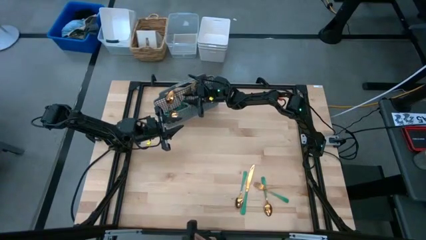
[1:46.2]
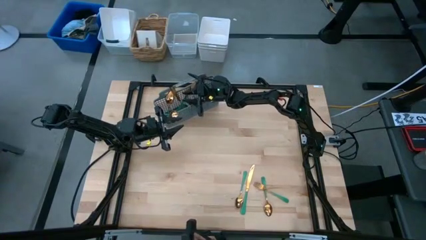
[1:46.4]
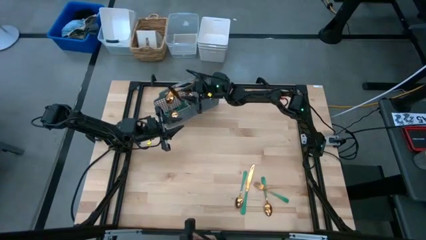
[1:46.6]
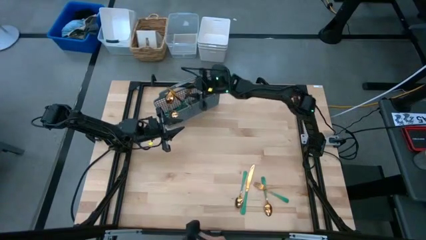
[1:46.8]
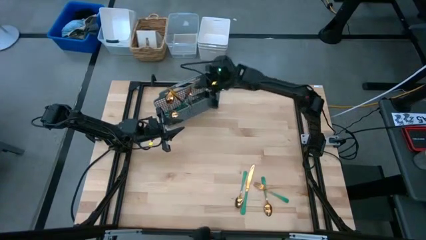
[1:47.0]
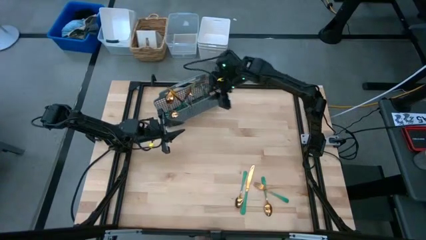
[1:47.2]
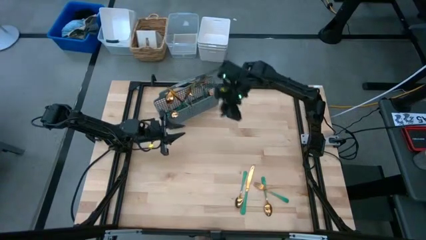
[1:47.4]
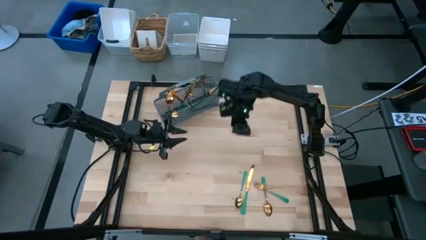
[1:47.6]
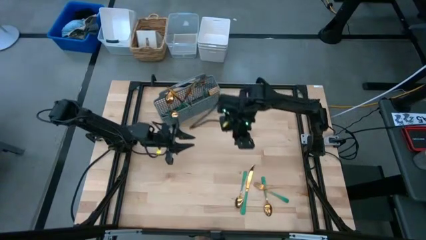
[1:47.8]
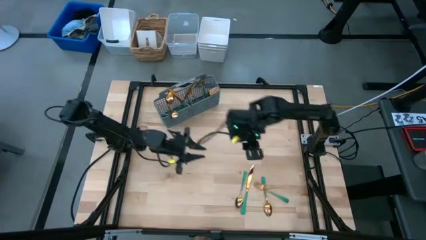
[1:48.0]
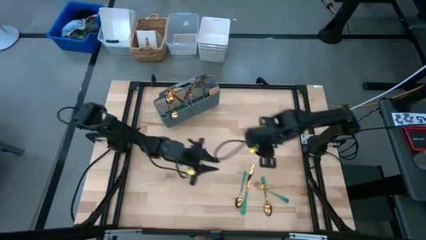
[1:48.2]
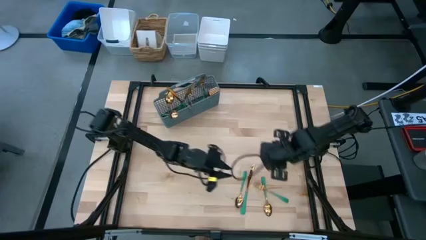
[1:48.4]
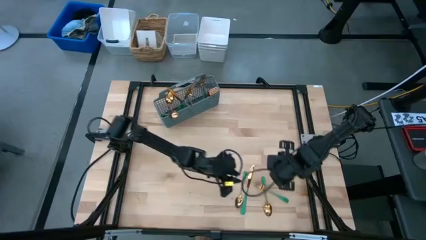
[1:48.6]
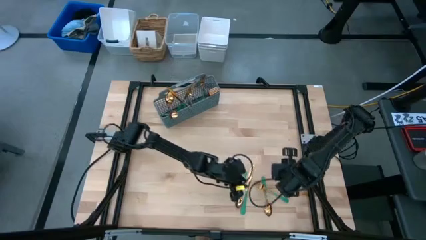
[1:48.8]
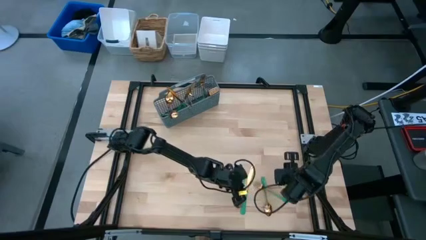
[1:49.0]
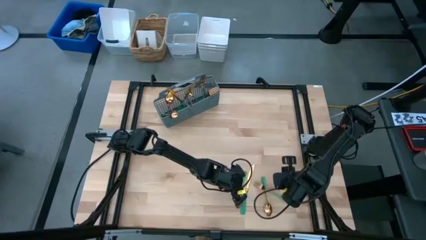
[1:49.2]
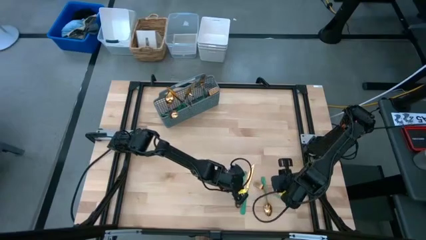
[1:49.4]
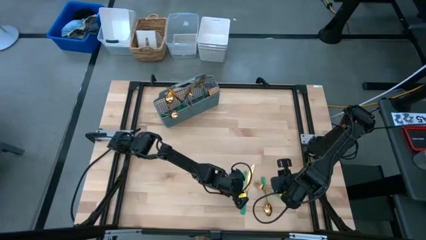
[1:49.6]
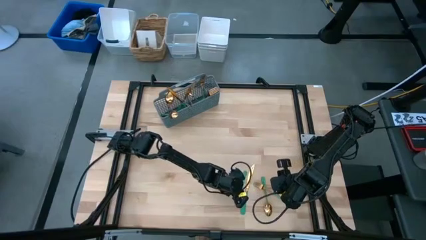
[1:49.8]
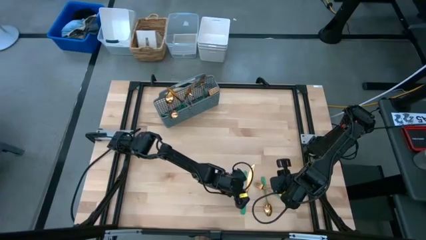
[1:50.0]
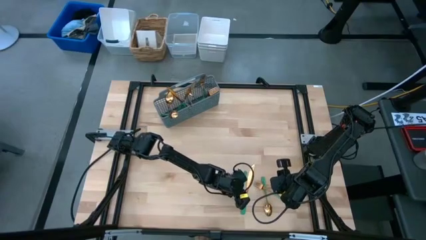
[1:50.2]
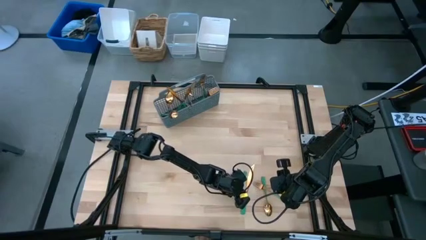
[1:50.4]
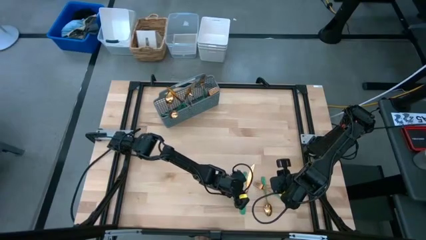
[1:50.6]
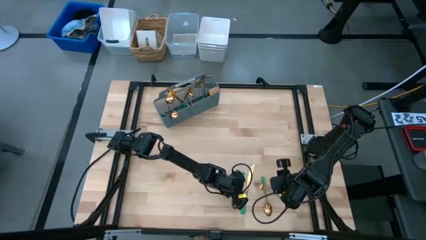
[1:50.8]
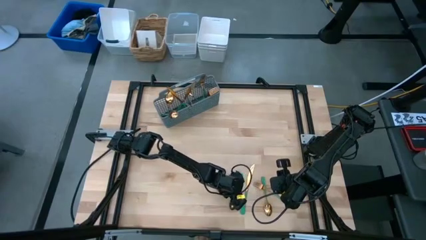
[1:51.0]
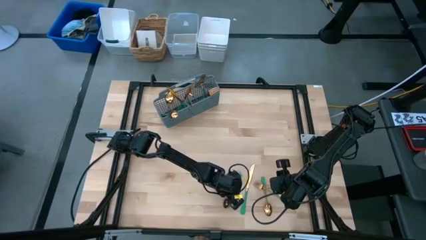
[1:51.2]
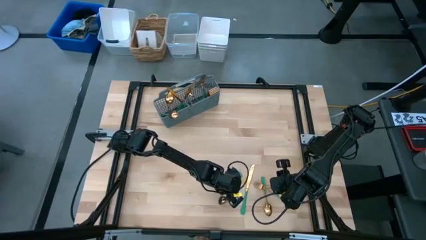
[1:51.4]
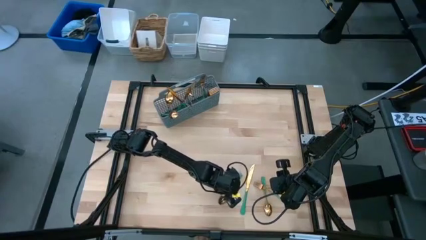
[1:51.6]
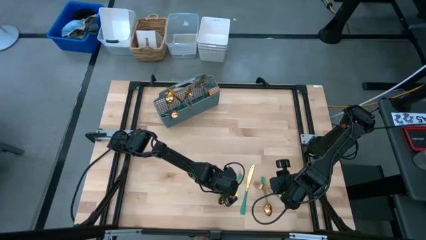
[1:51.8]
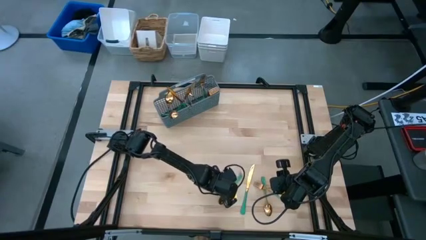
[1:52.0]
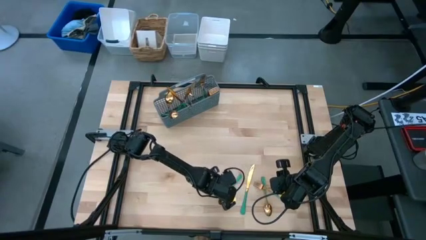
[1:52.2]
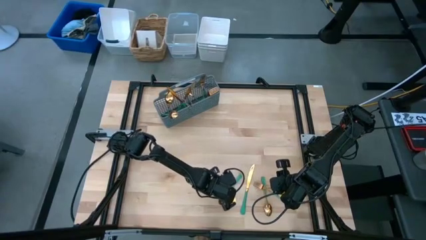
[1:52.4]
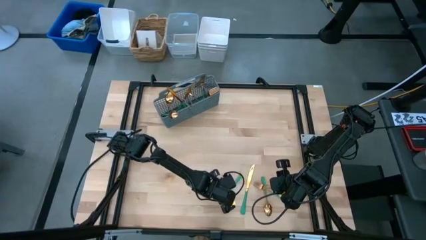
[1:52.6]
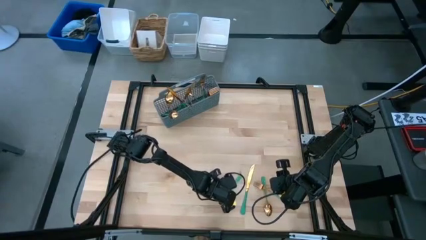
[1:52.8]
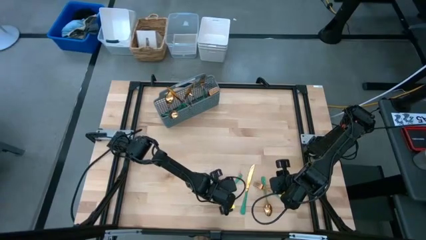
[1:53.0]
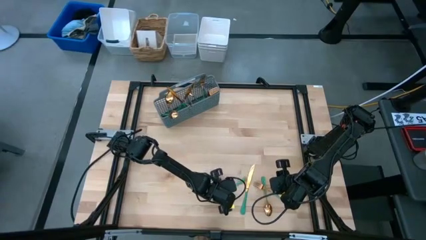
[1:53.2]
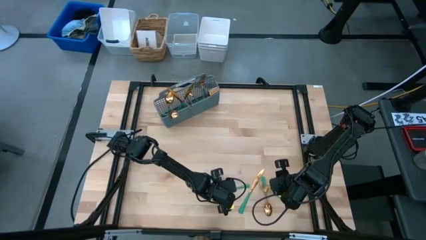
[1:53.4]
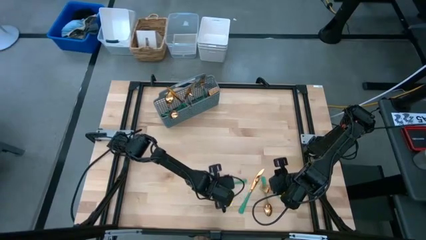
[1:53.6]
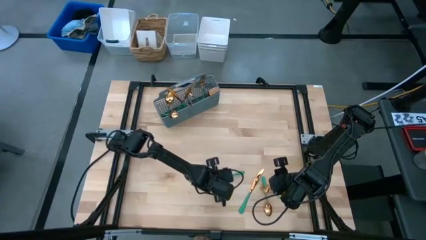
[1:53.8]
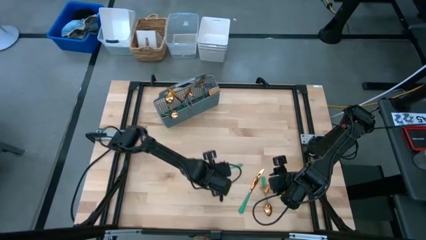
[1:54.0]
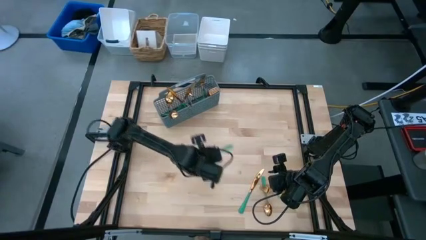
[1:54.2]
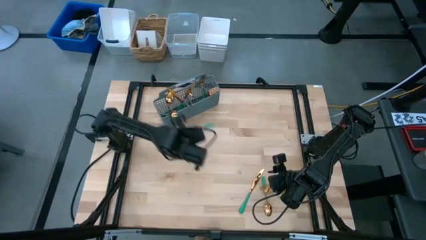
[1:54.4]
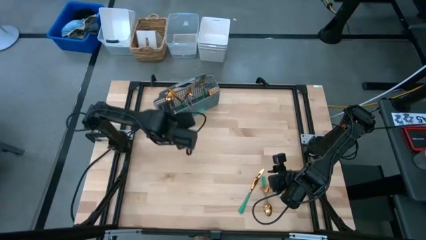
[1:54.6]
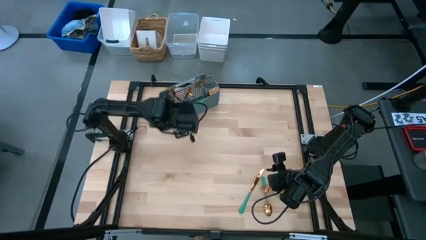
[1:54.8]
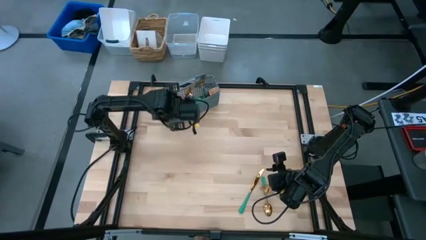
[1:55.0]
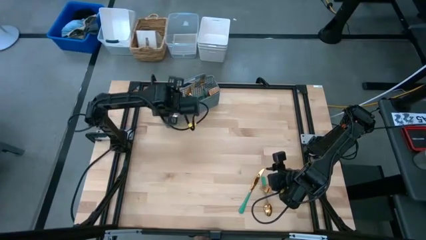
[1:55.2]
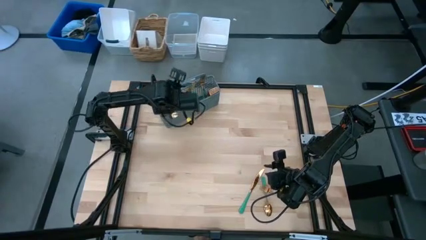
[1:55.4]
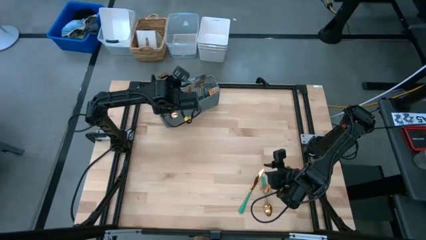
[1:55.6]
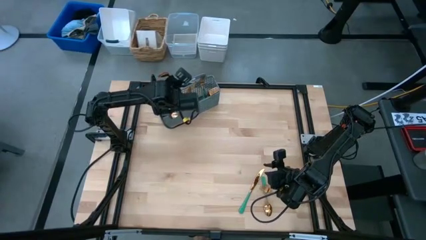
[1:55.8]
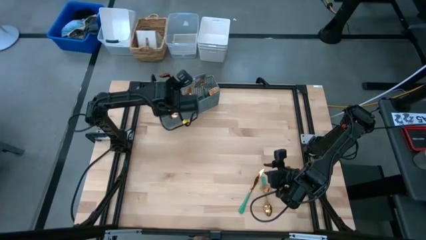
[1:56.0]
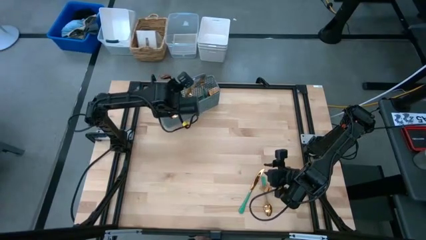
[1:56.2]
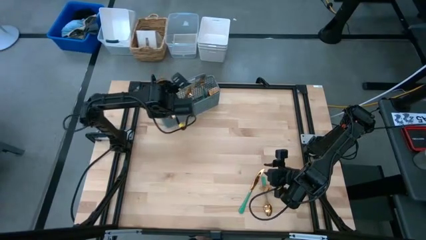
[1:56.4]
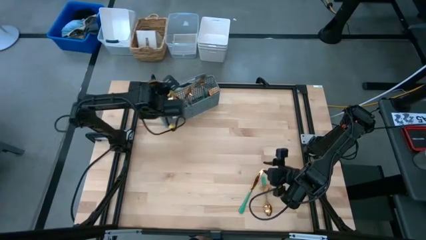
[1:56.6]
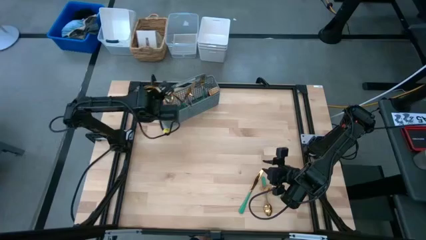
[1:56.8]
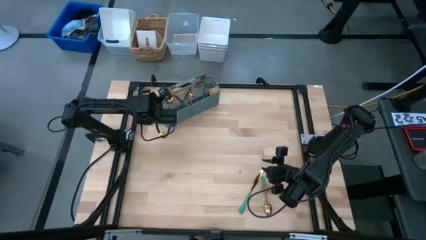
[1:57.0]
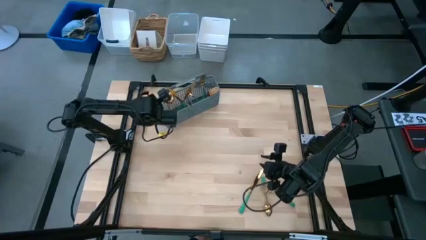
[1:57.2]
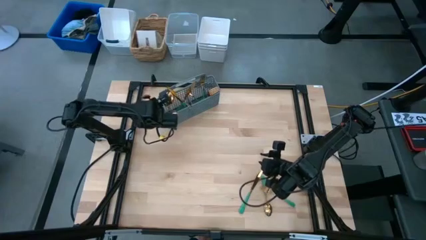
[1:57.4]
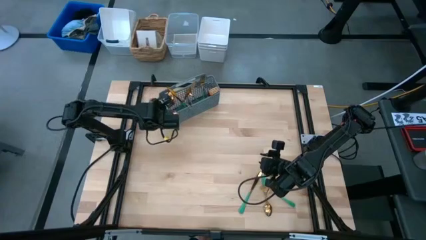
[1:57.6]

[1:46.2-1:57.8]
Task: Sort silverware
Put the spoon into the left section of the silverware holder

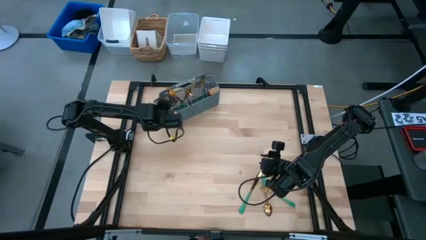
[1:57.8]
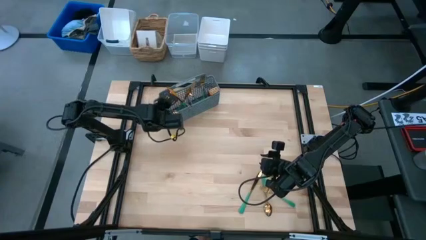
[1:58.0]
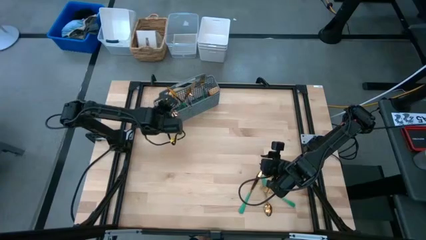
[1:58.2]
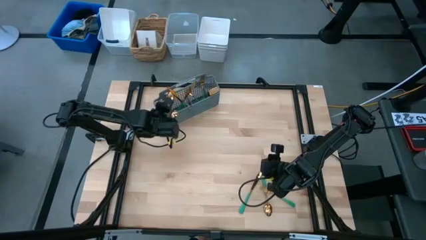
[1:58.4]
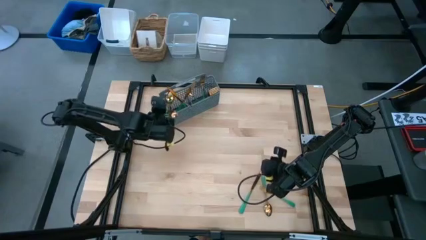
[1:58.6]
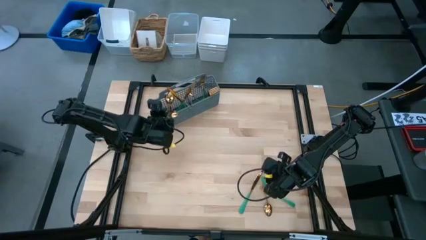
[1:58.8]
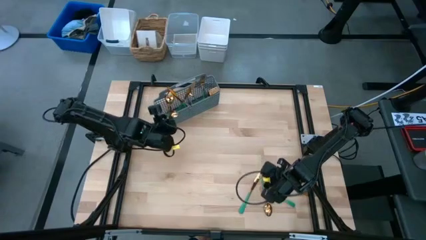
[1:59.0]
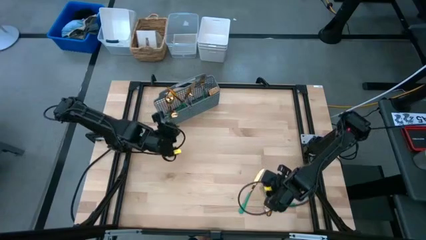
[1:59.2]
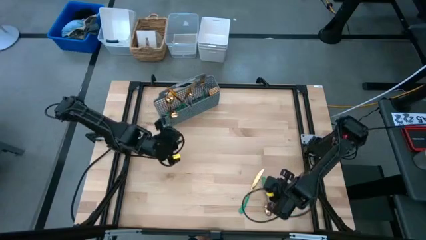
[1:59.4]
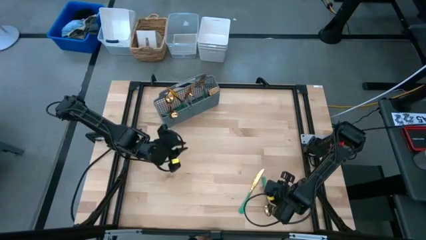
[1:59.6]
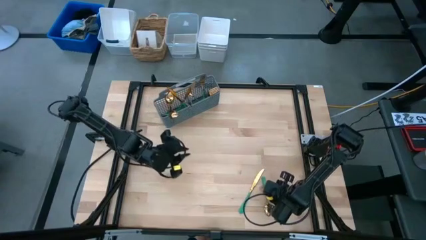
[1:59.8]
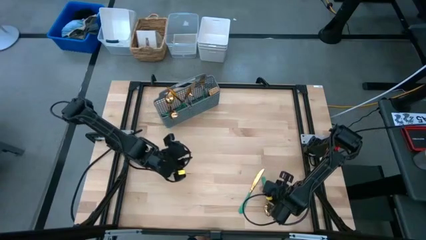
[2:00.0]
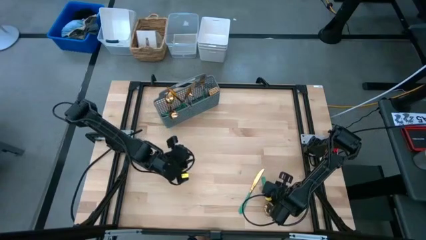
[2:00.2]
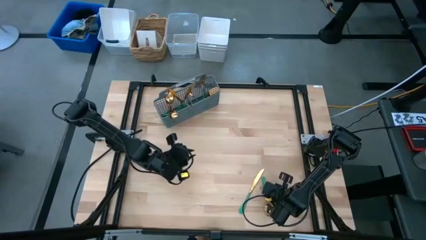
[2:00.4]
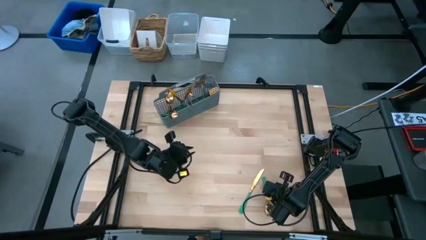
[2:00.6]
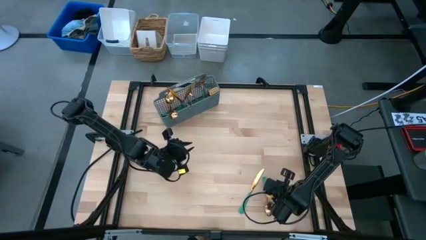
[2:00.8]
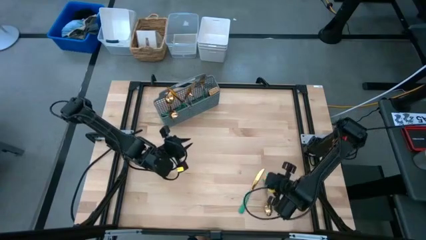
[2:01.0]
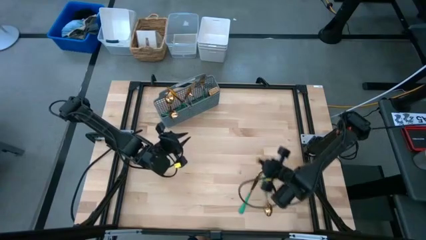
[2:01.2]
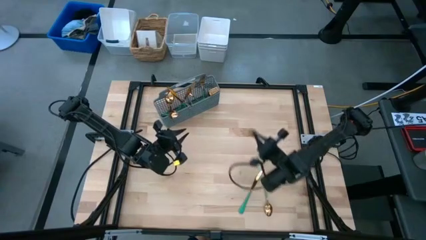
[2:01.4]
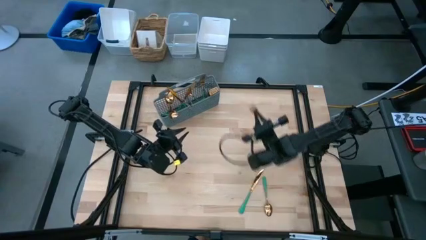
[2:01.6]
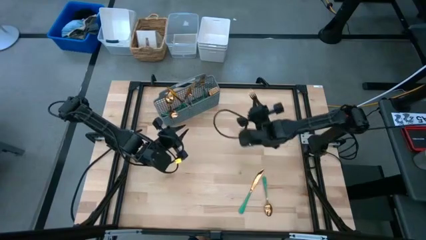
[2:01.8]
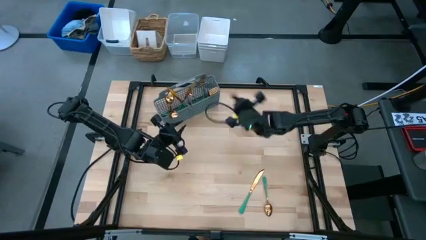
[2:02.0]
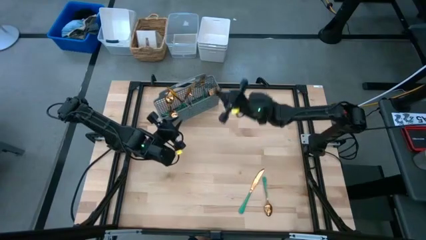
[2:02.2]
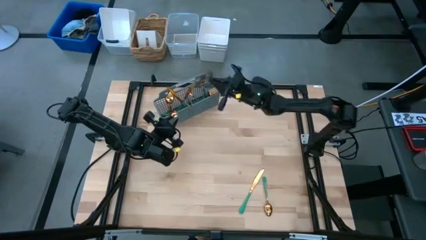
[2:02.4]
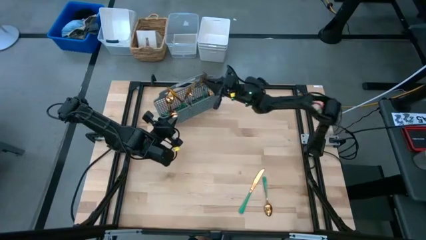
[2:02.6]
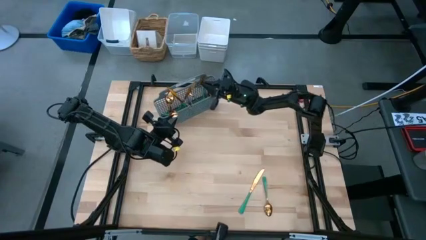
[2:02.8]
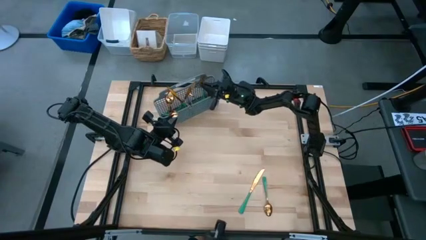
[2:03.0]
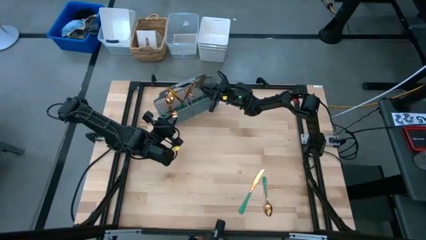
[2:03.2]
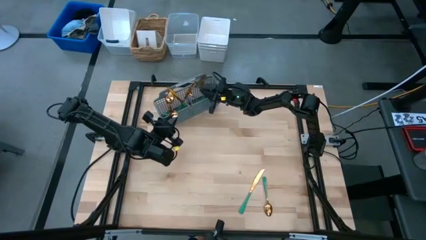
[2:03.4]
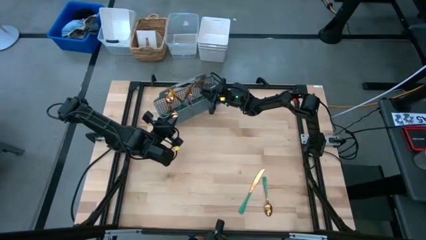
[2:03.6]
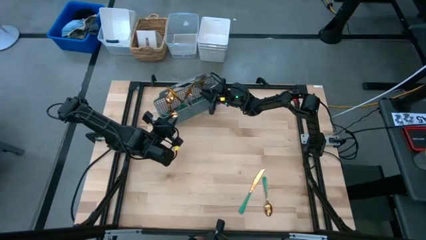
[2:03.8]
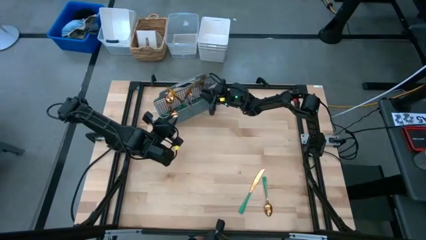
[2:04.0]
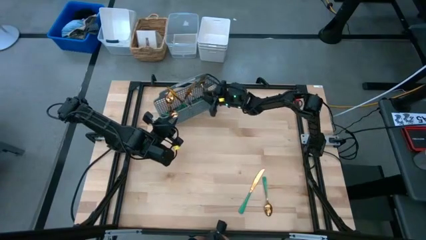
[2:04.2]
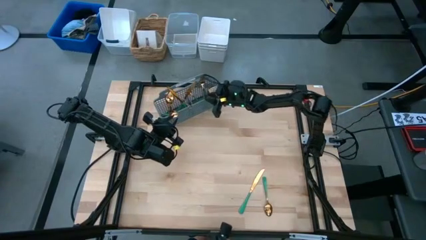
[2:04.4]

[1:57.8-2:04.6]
Put the fork into the middle right section of the silverware holder
